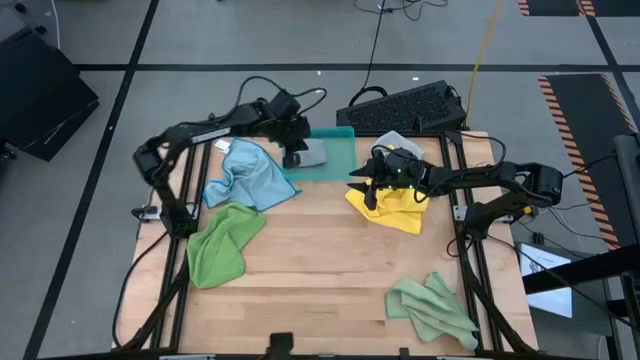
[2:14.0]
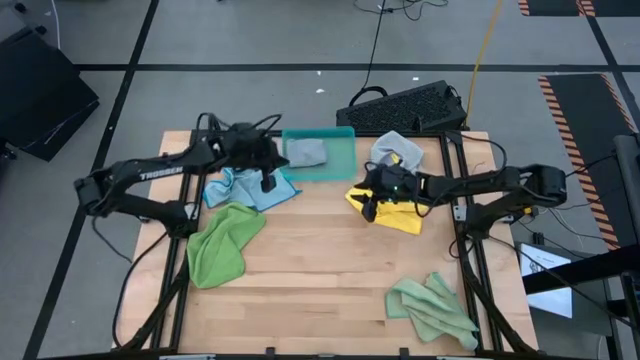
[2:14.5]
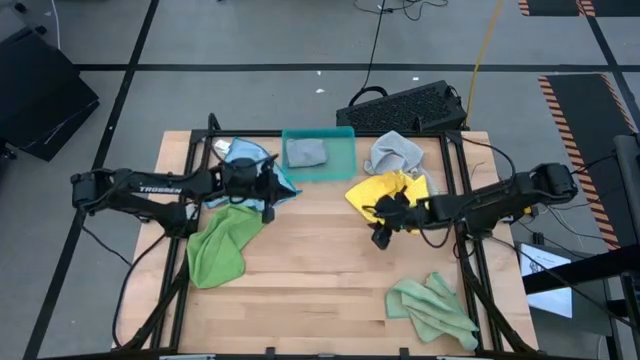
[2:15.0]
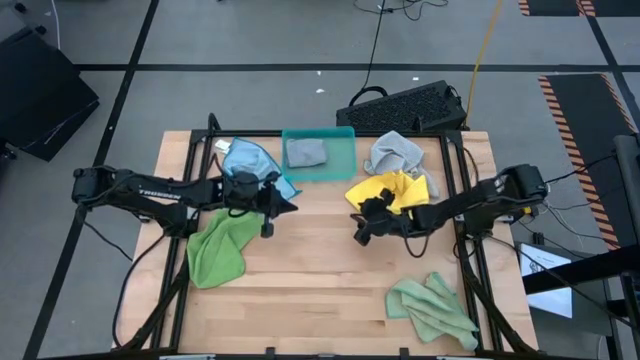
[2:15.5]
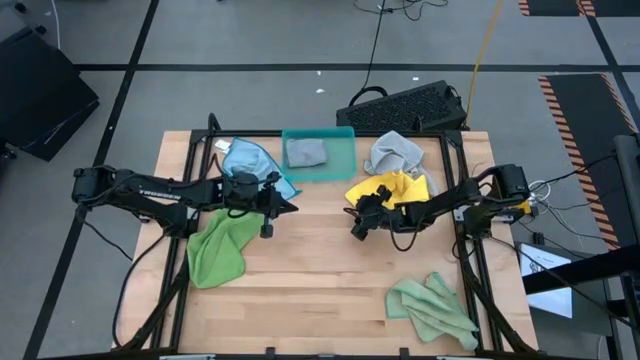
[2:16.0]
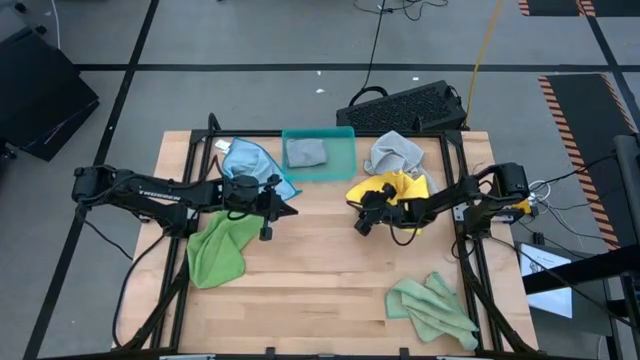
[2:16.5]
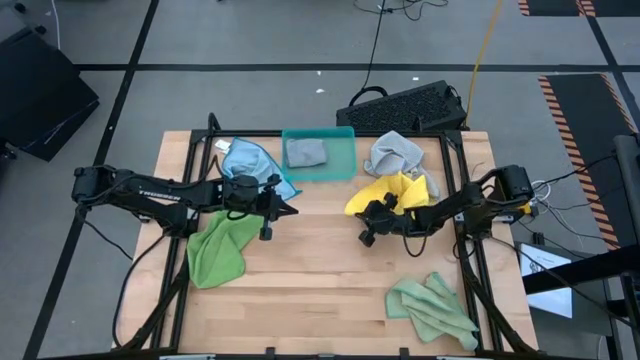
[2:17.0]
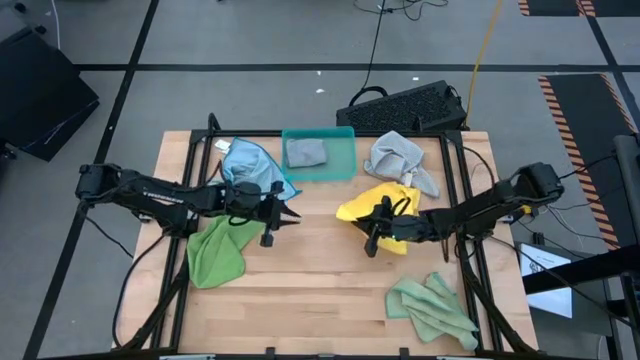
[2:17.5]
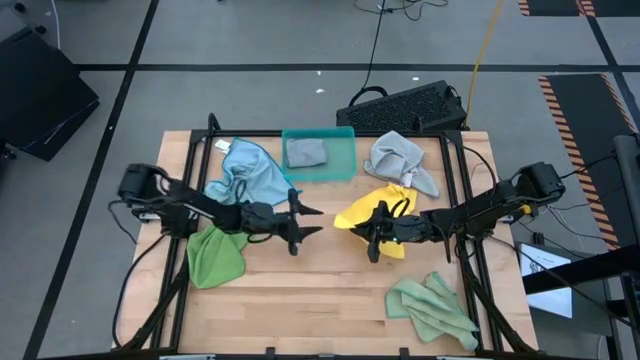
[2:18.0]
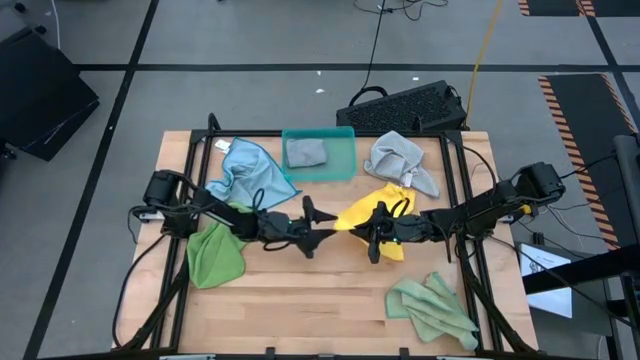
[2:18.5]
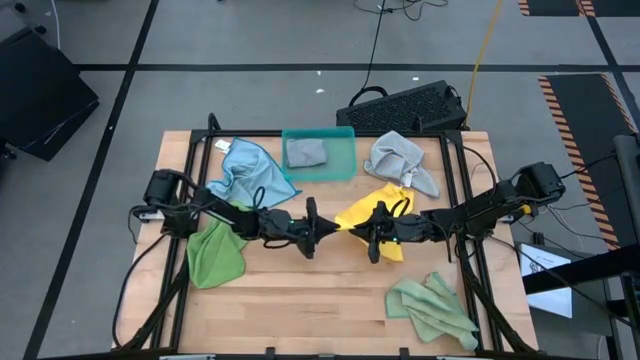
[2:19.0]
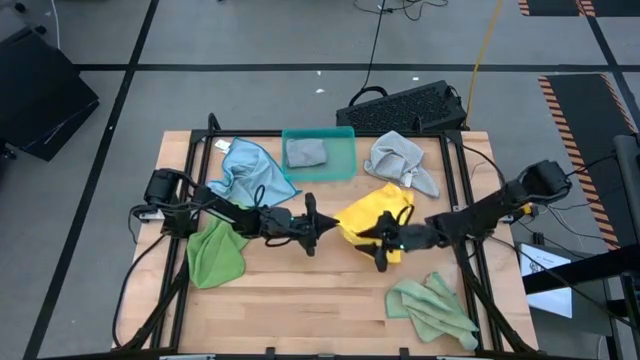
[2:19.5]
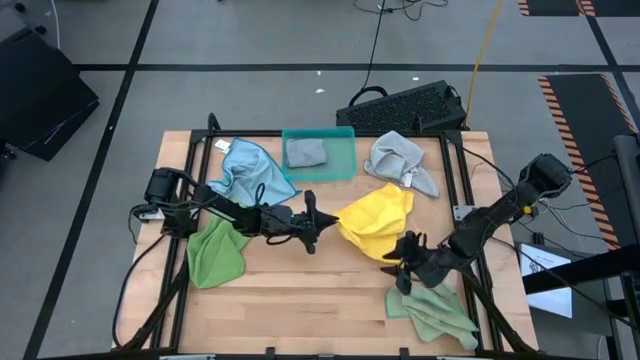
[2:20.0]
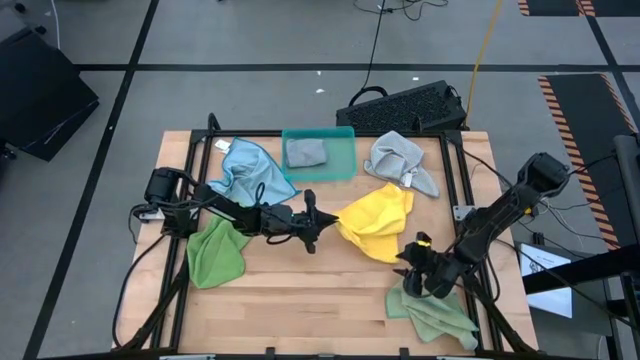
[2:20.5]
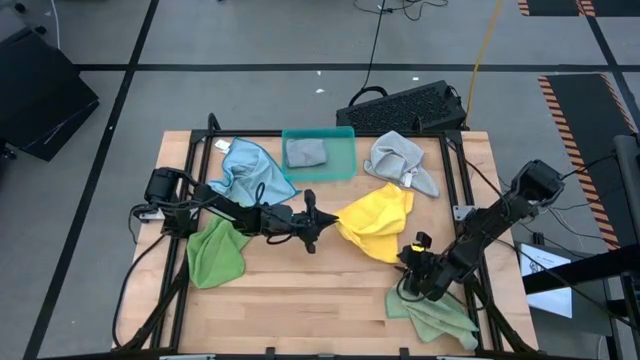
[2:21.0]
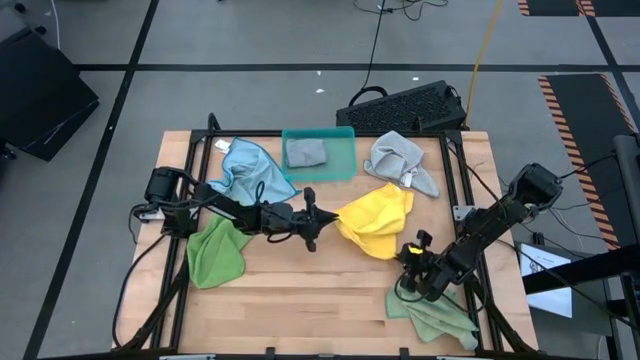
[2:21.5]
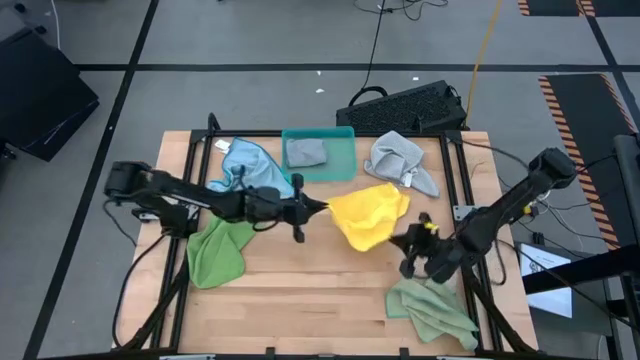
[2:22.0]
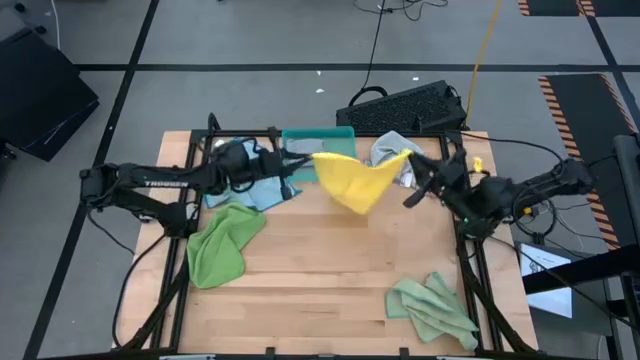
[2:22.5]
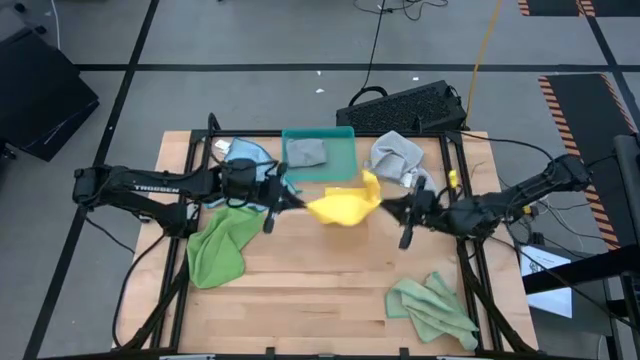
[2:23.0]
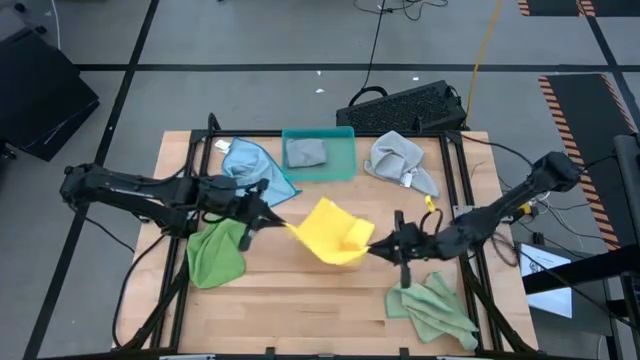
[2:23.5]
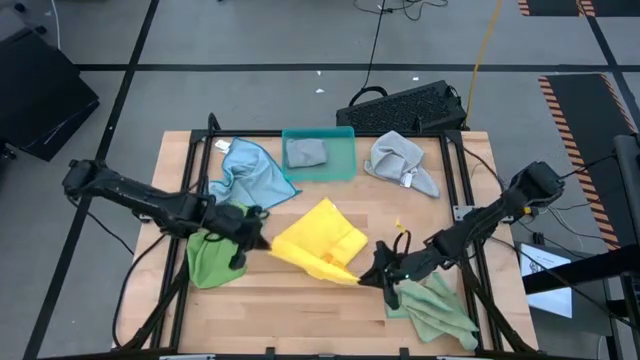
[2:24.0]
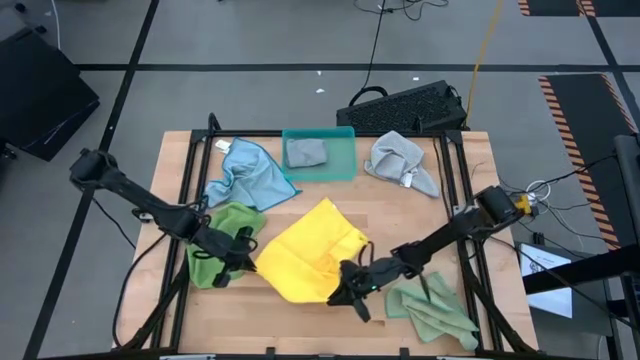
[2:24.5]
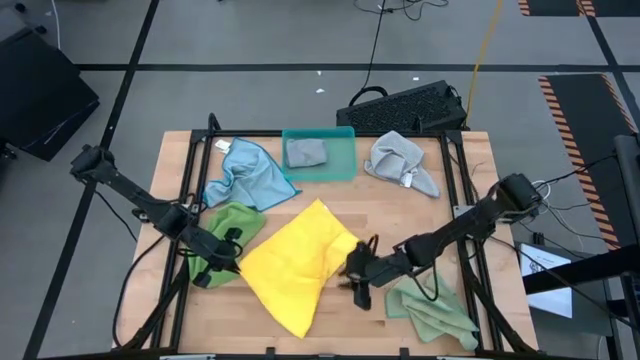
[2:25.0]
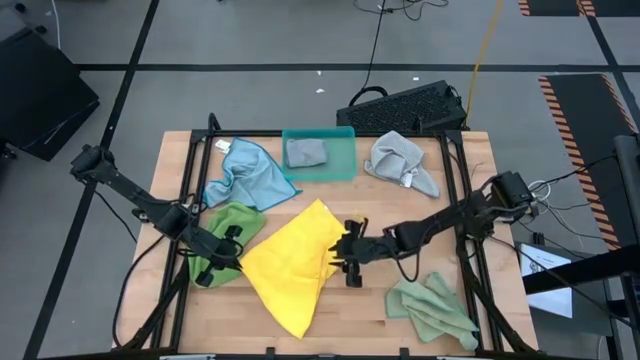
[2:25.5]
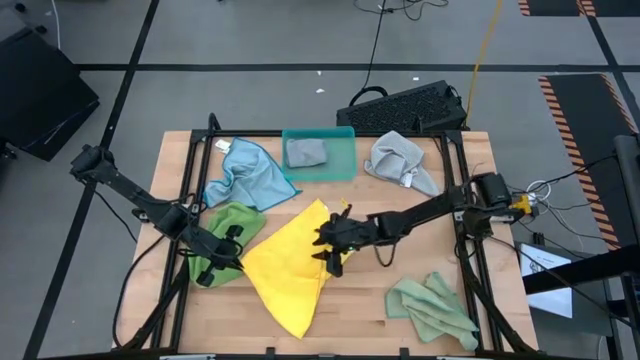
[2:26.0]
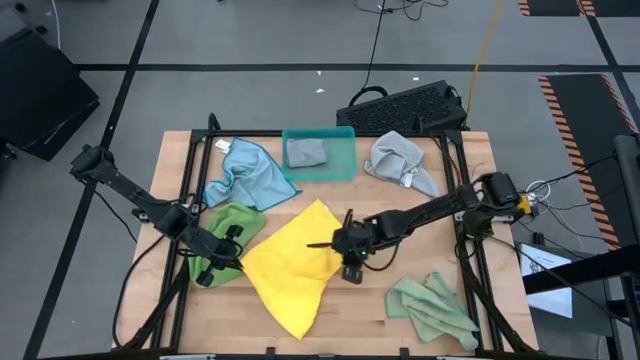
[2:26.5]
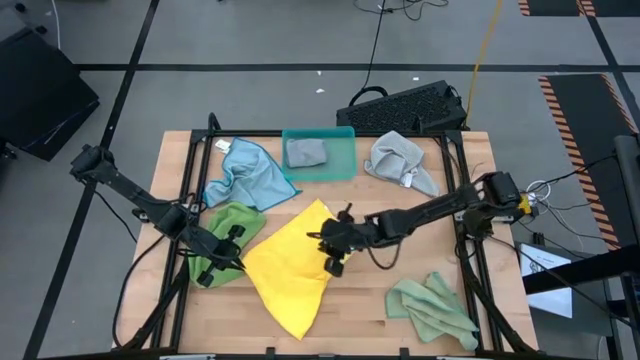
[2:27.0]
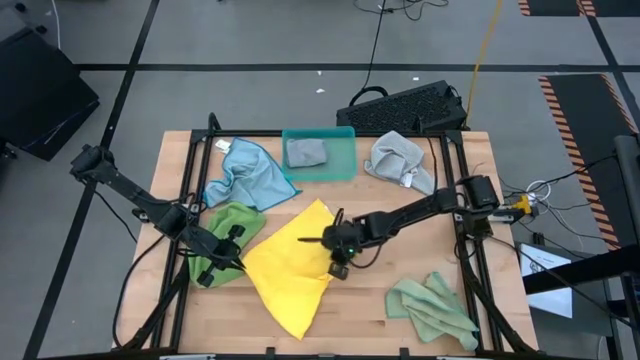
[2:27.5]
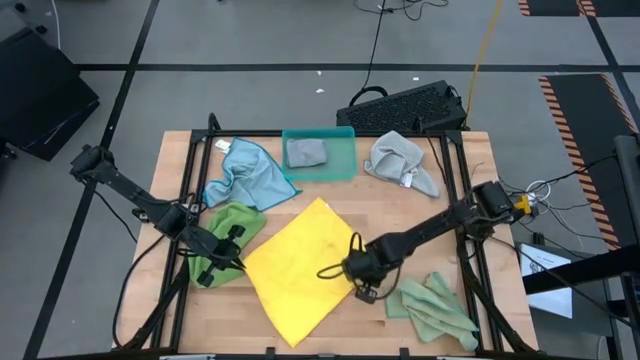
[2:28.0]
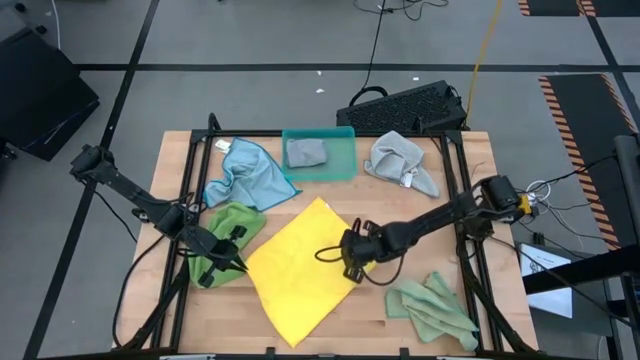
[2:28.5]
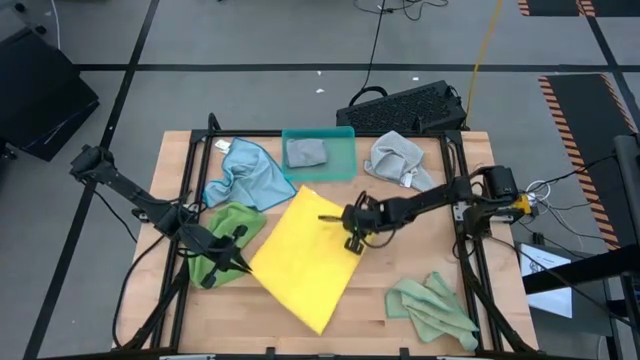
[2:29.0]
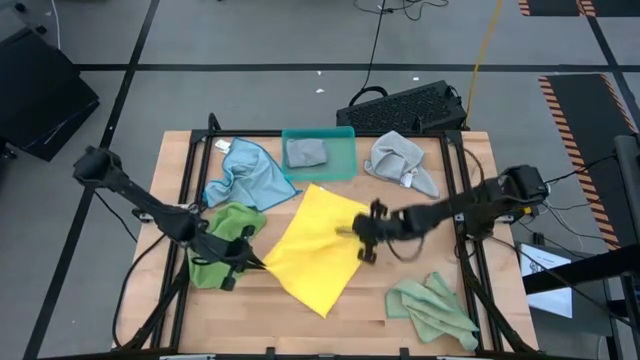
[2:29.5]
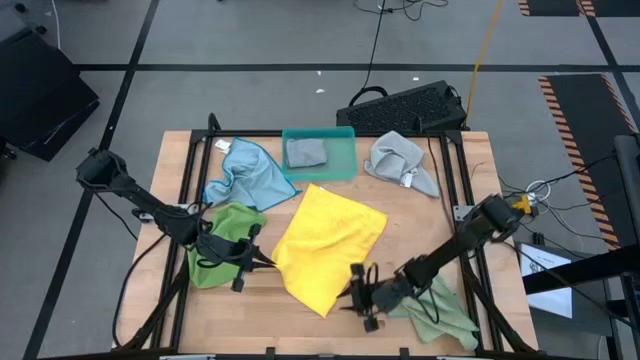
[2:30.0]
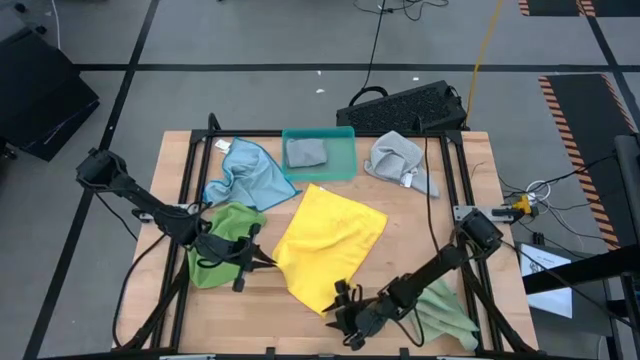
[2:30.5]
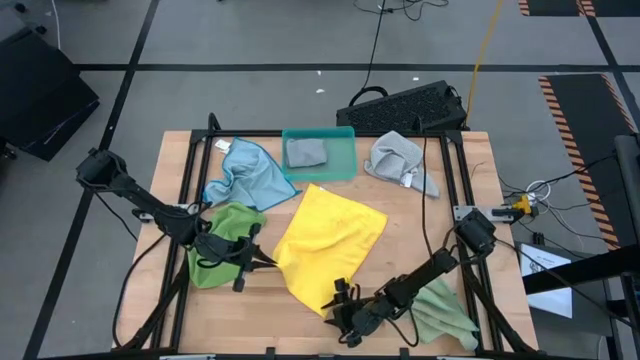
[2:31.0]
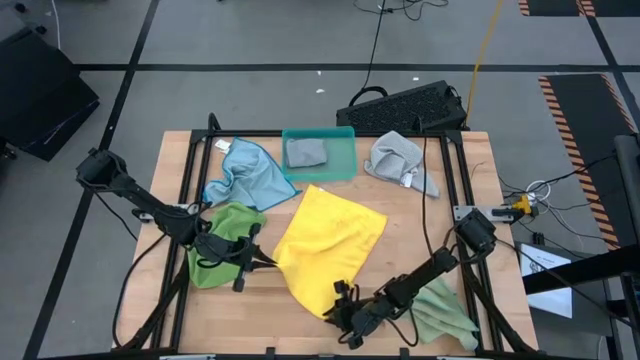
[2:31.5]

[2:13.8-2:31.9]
Task: Fold microfiber towels
Fold the yellow microfiber cloth

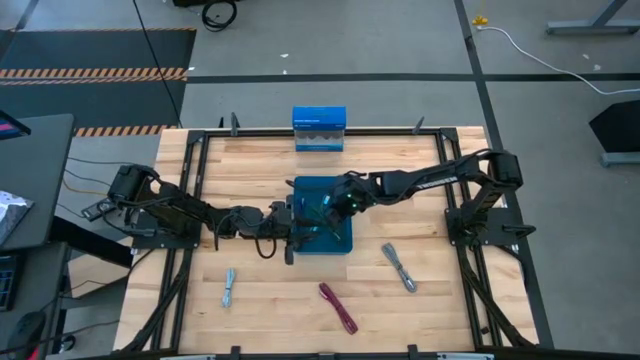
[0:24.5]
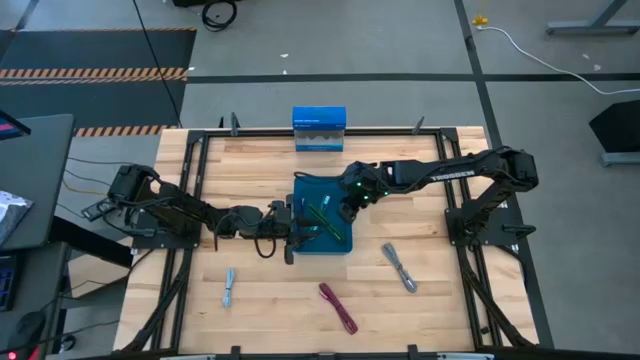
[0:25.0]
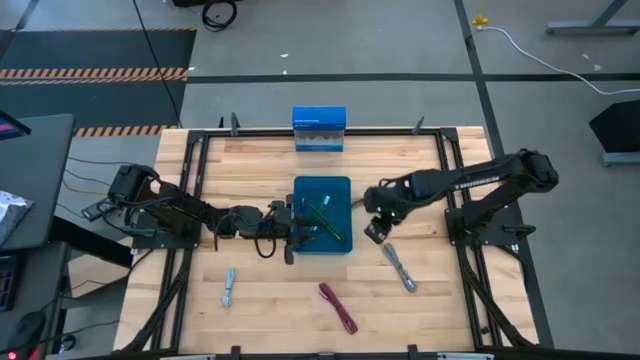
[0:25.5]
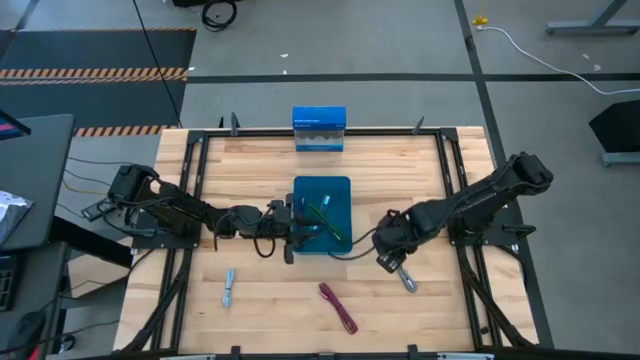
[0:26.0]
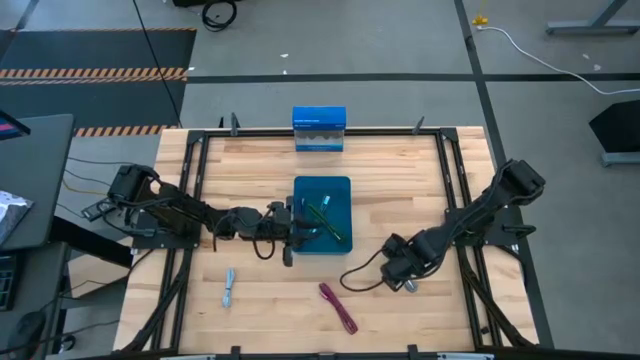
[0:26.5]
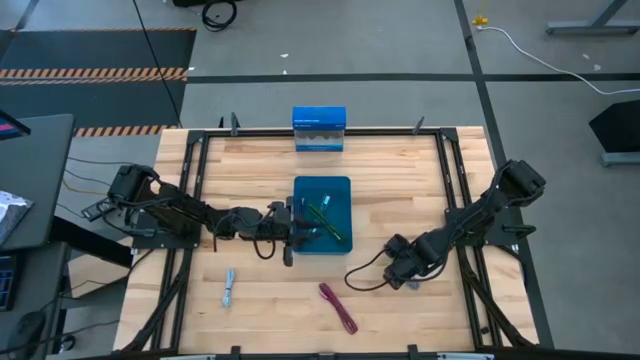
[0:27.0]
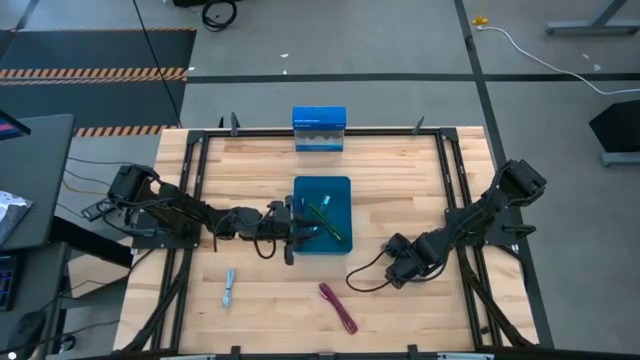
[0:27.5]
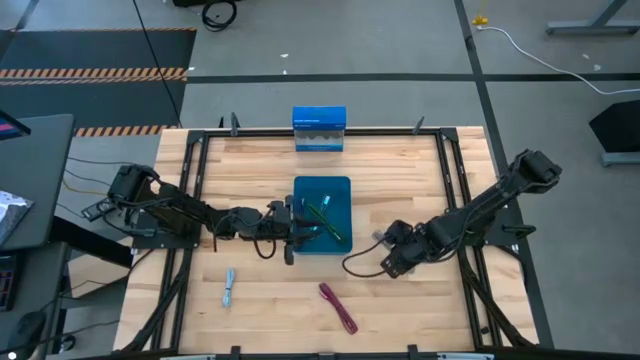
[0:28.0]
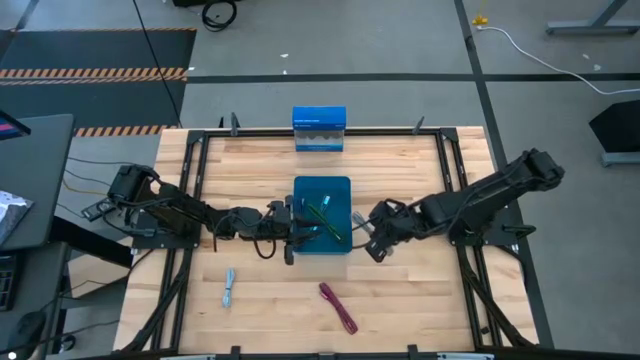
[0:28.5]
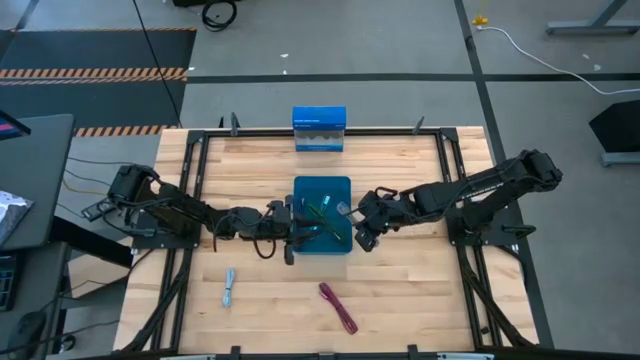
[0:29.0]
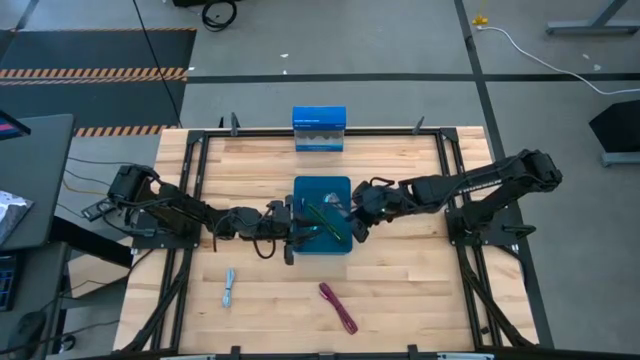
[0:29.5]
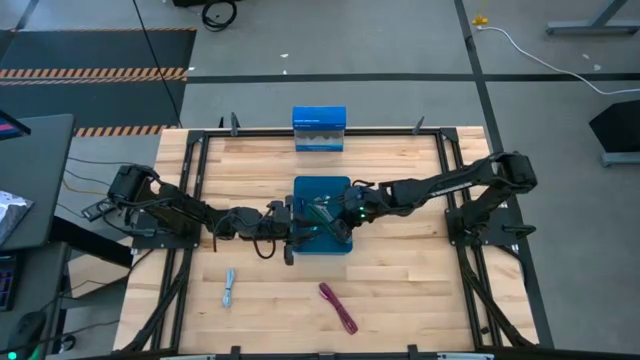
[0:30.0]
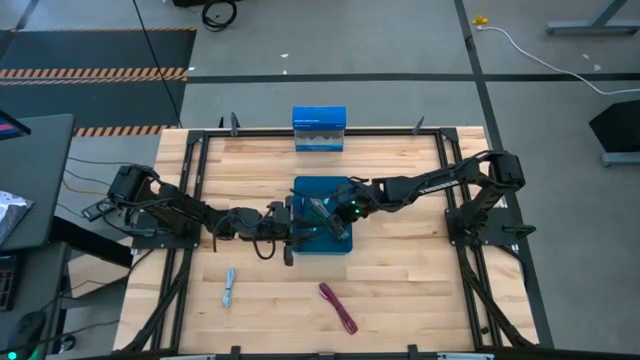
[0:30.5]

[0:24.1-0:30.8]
Task: Pick and place USB-C Cables
Put the black charger cable into the blue bin
